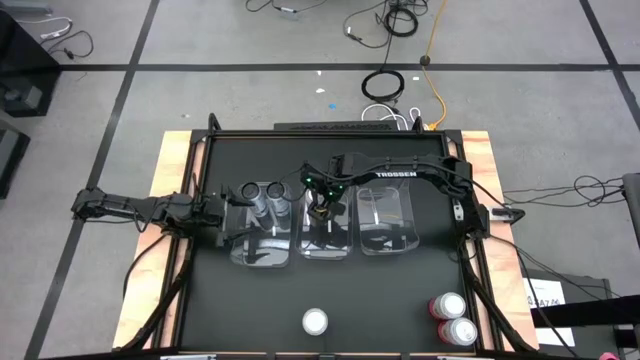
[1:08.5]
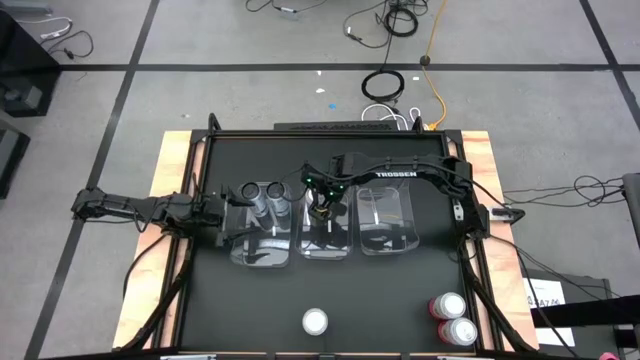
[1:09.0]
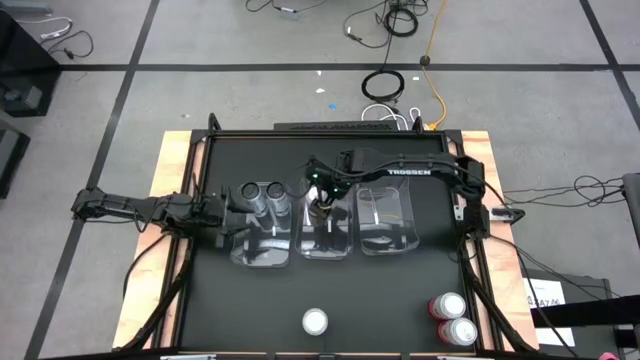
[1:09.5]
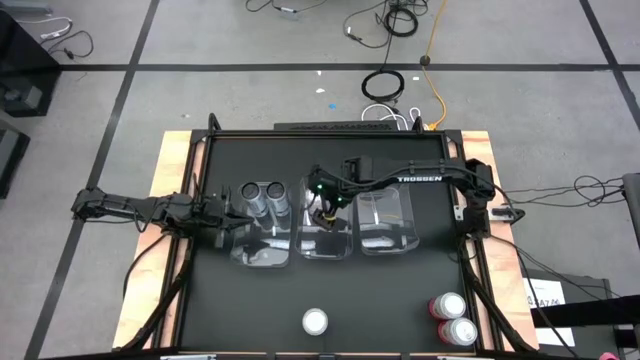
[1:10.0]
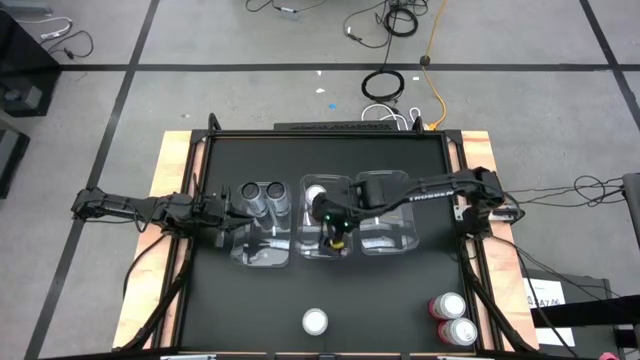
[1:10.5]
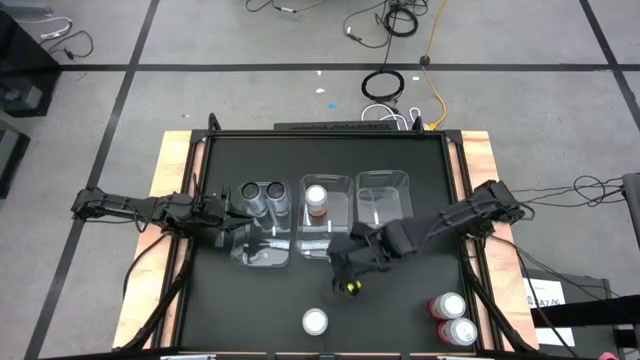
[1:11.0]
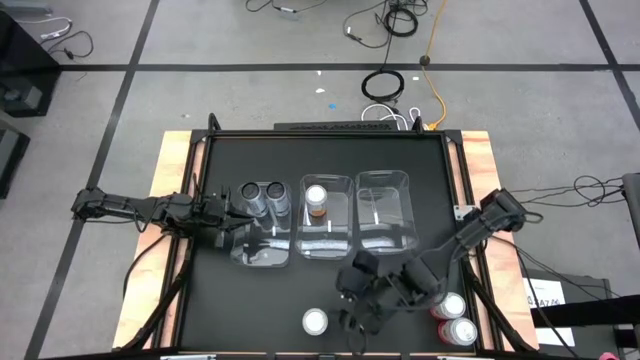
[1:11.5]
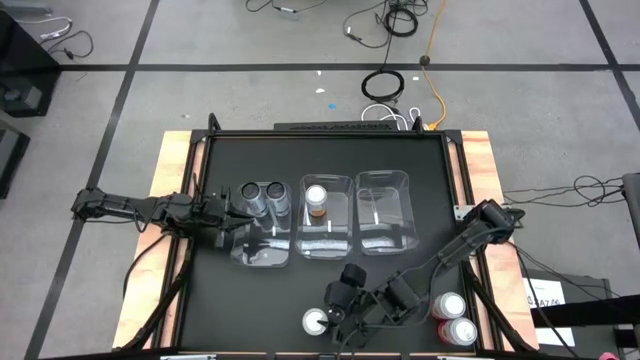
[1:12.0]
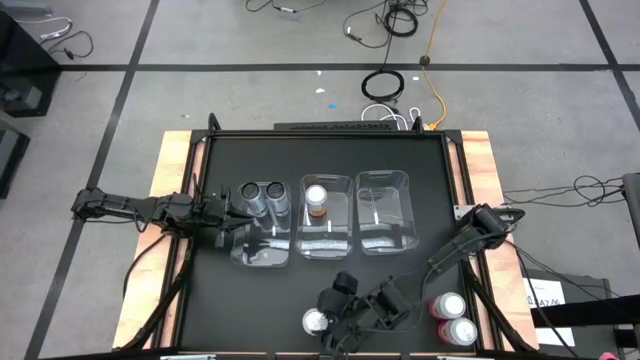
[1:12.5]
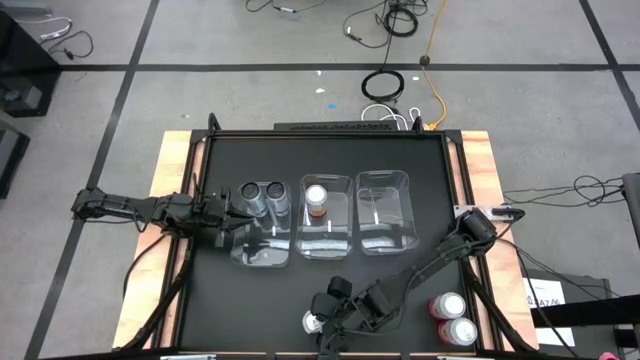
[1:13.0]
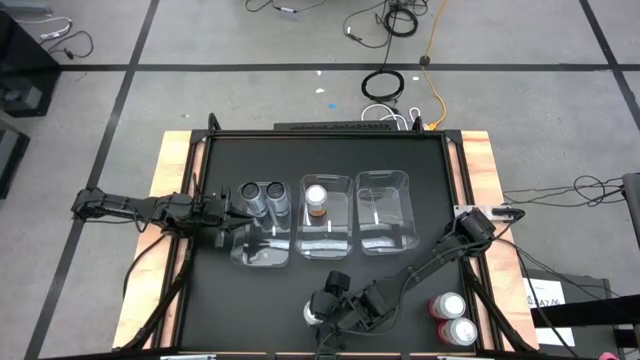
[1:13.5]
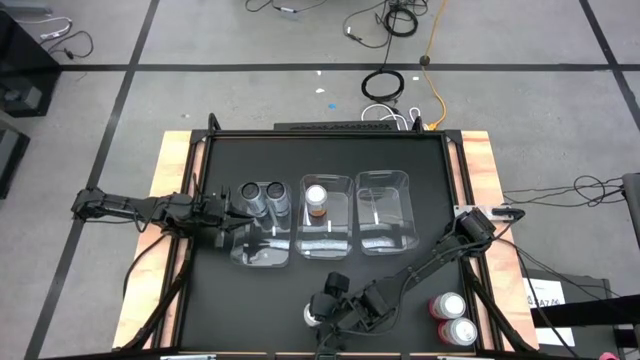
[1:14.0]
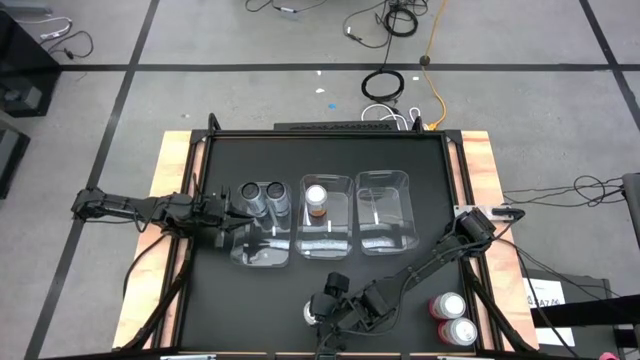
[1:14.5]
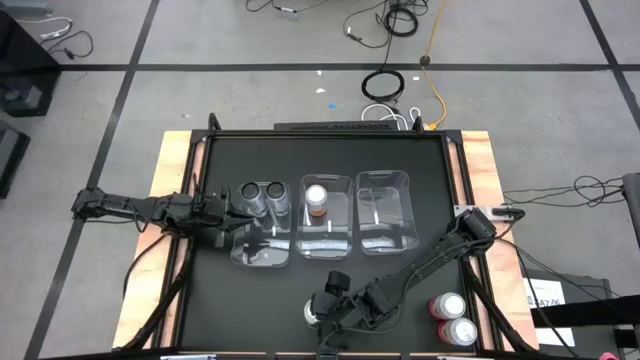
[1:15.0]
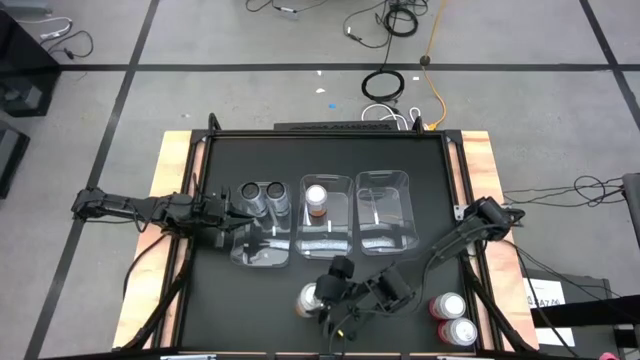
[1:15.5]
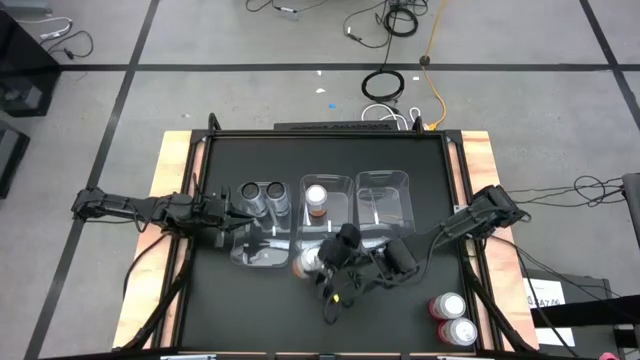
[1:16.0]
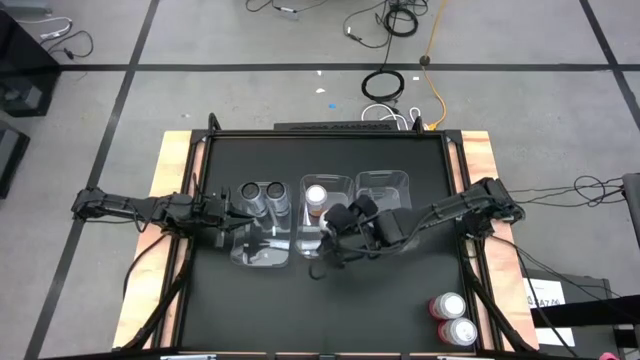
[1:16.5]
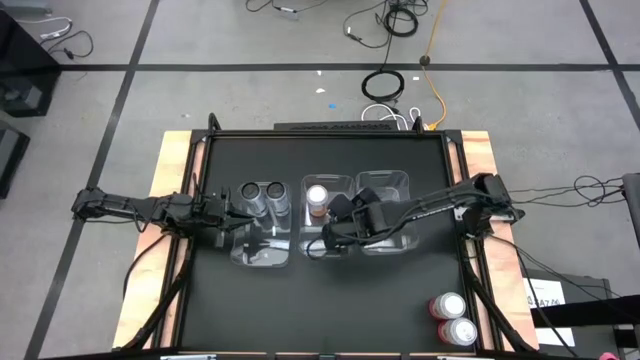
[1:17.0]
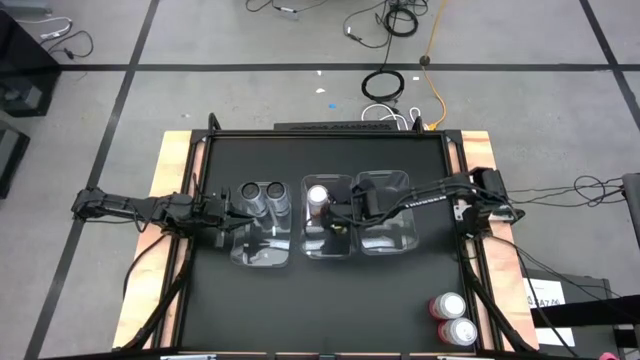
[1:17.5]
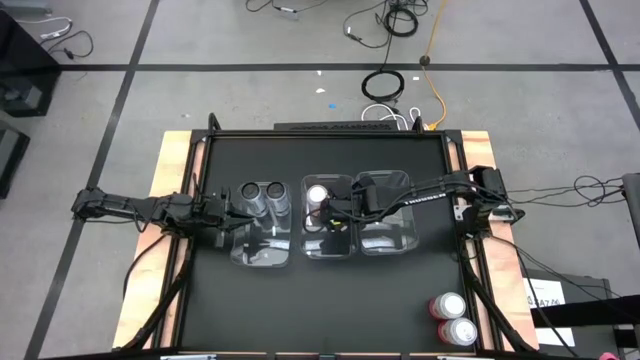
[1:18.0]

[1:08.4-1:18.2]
Task: Sort soda cans
Put the orange soda can into the middle transparent bin

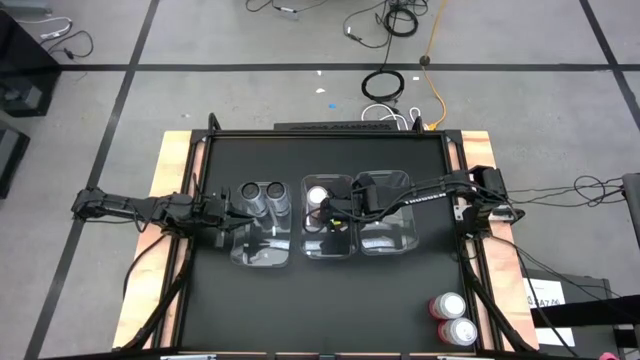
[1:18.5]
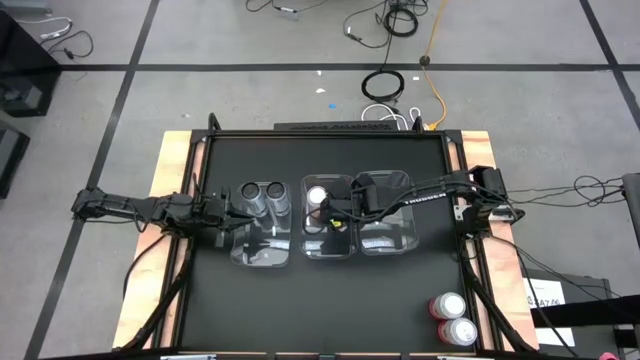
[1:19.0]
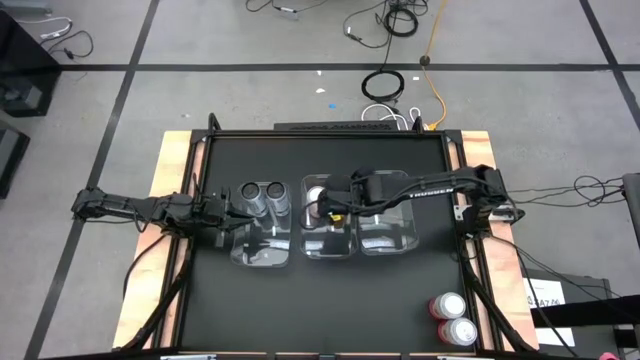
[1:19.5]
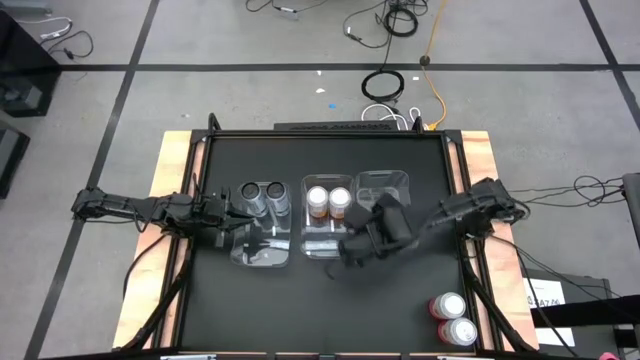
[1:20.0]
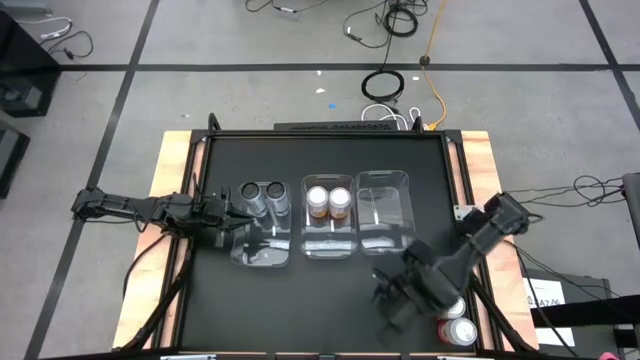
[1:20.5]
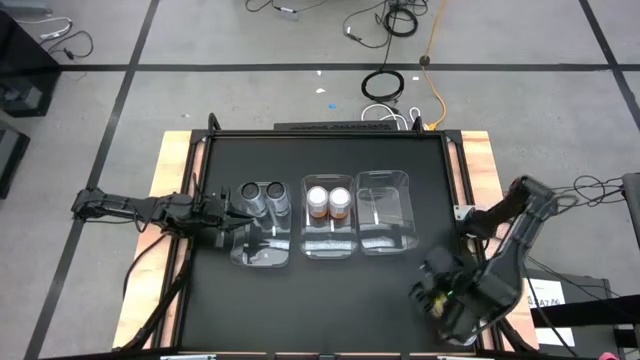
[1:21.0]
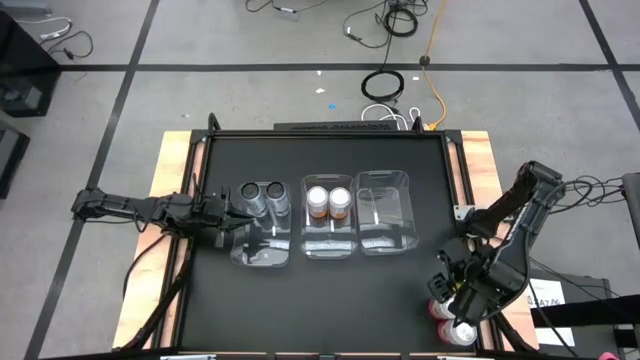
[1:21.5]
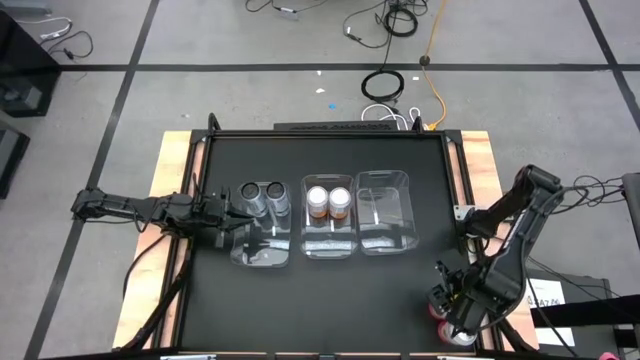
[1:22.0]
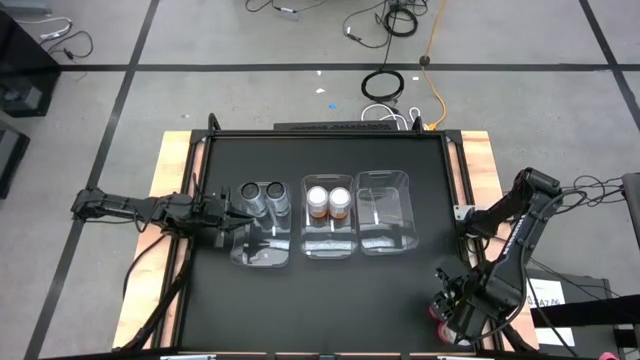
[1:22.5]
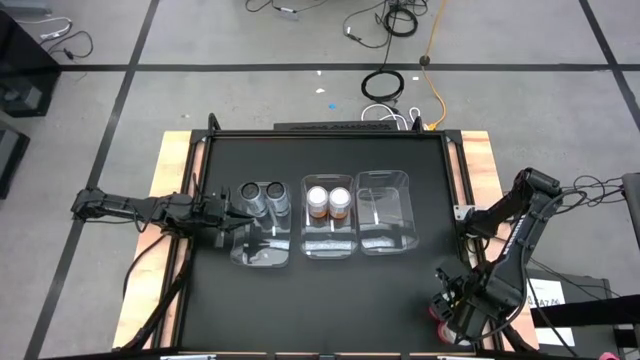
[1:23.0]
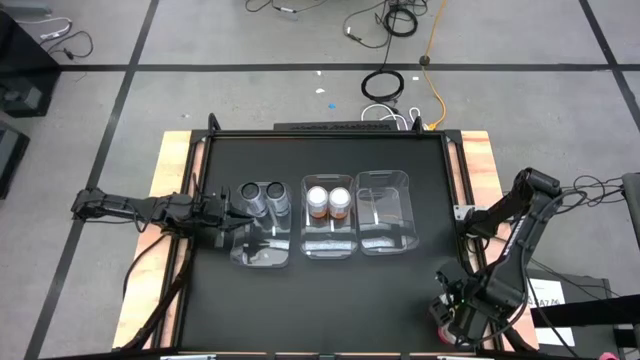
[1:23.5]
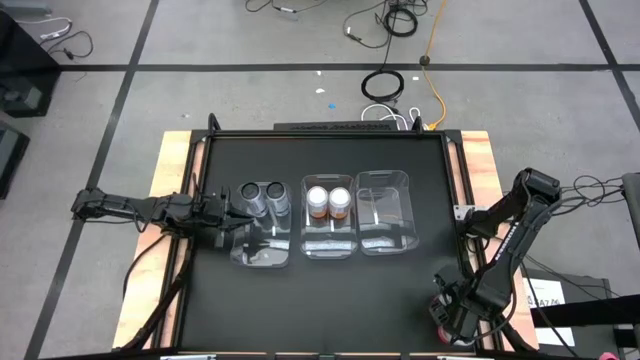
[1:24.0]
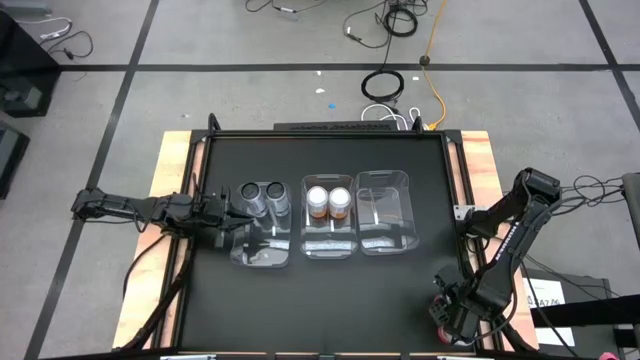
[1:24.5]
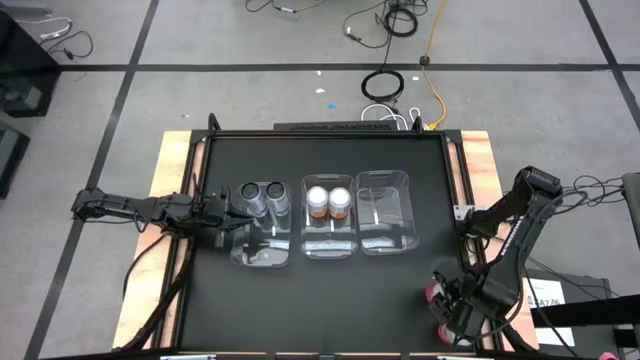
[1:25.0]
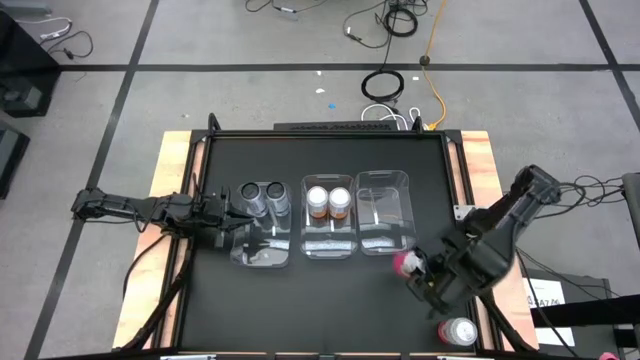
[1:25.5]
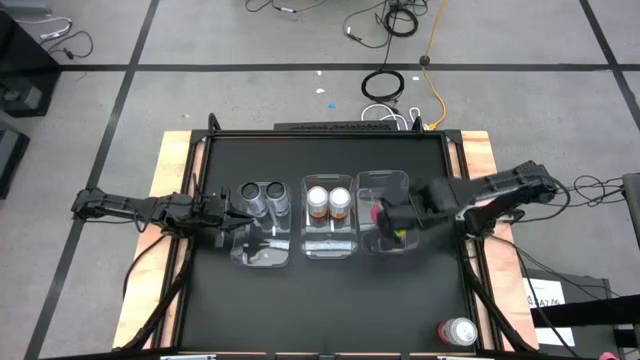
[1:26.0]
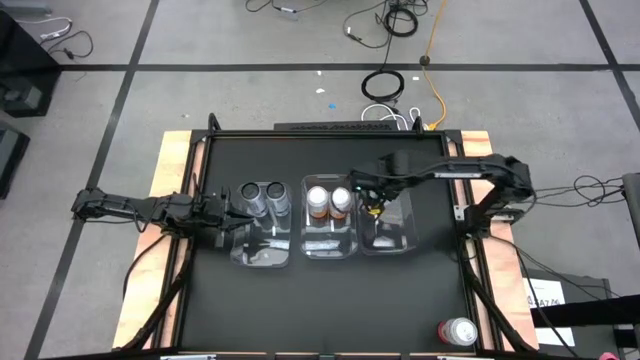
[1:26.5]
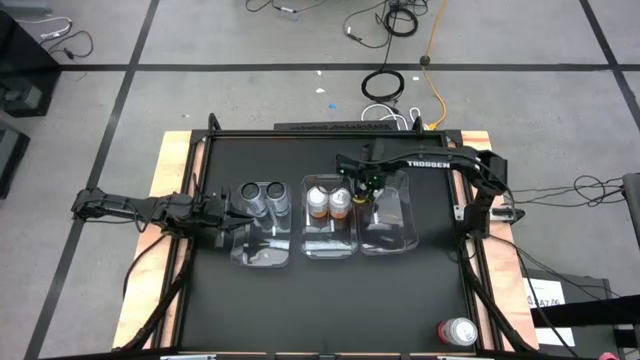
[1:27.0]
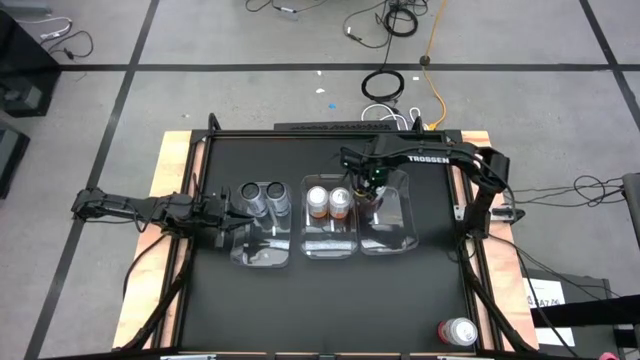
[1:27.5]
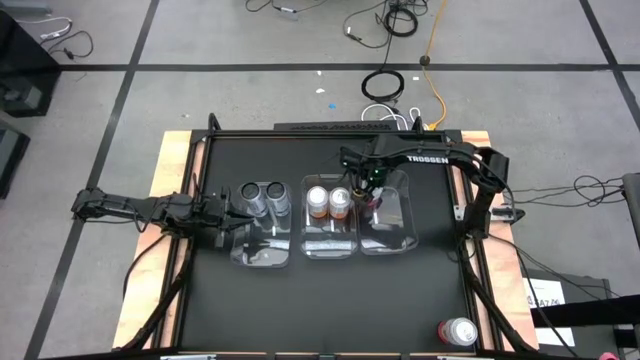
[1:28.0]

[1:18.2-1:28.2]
Put the top pink soda can into the right transparent bin

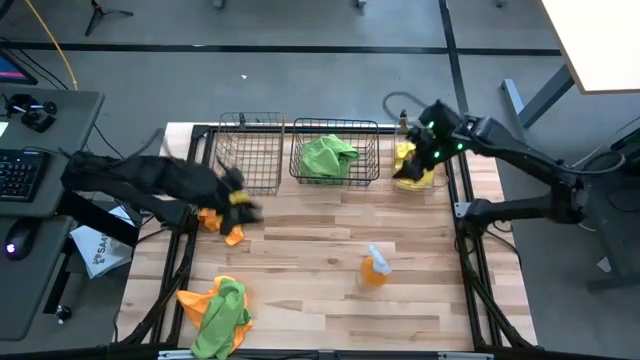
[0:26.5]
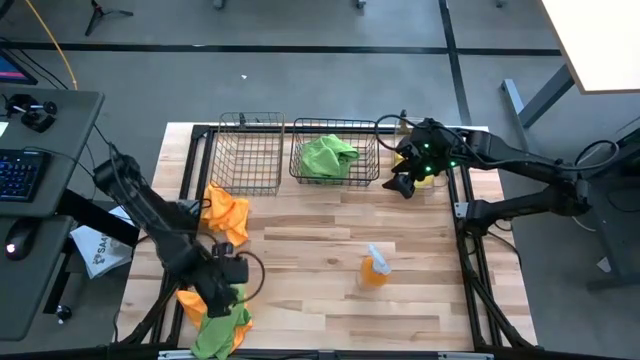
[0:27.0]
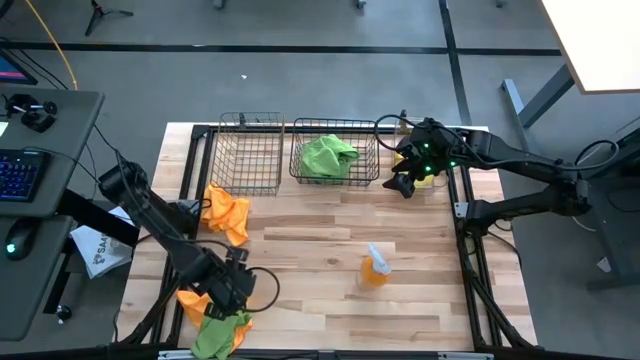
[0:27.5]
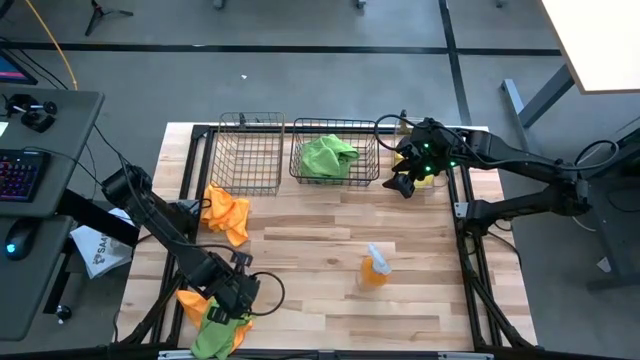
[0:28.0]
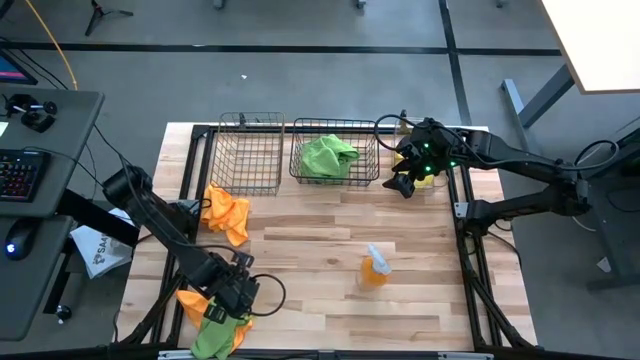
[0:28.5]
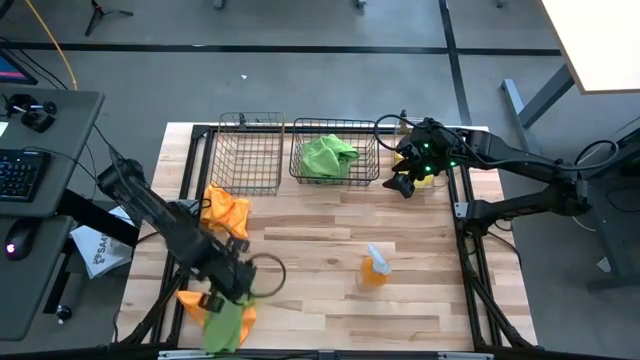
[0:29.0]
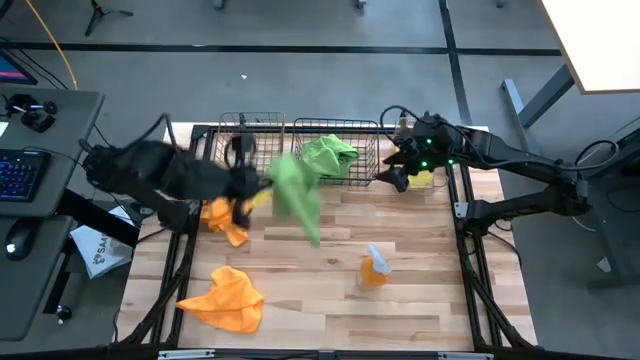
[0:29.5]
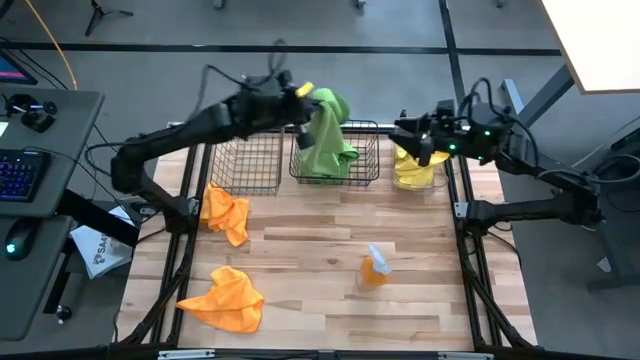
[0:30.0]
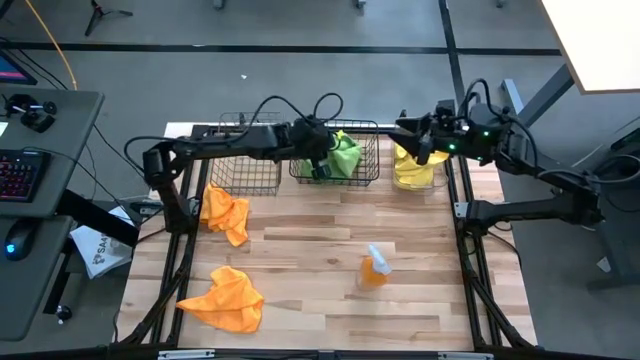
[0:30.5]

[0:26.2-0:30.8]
Task: Sort microfiber towel by color & place in baskets
Put the green microfiber towel into the black wire basket
